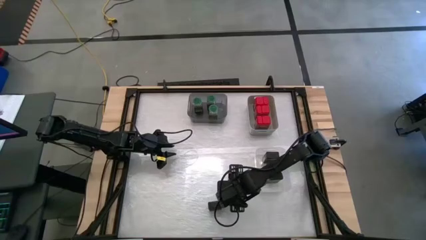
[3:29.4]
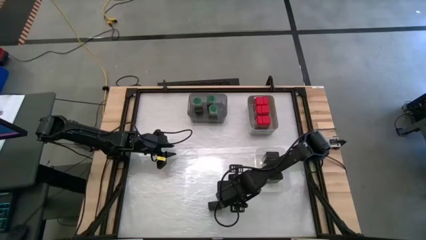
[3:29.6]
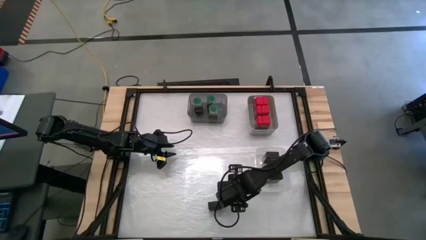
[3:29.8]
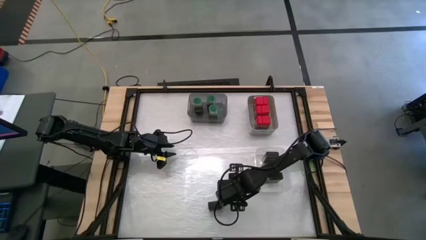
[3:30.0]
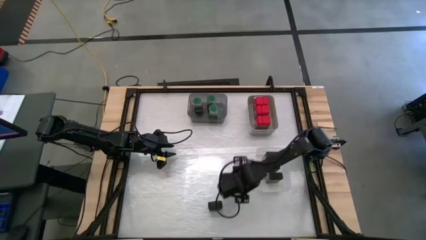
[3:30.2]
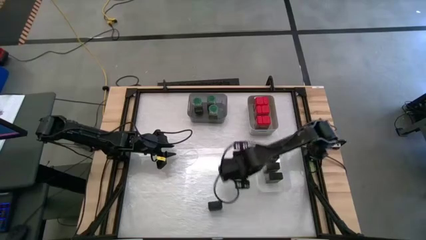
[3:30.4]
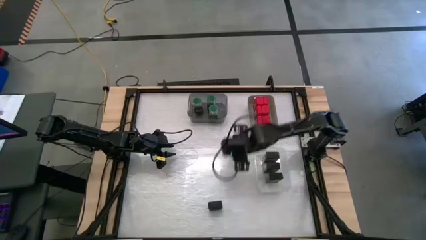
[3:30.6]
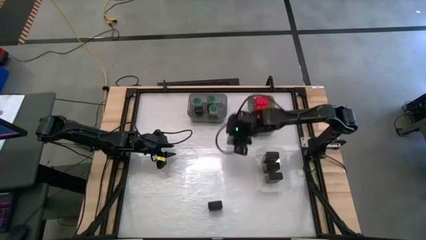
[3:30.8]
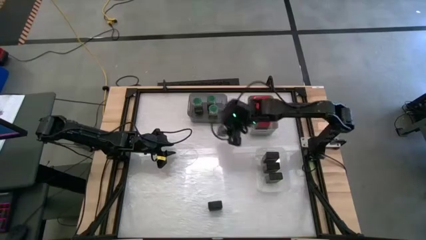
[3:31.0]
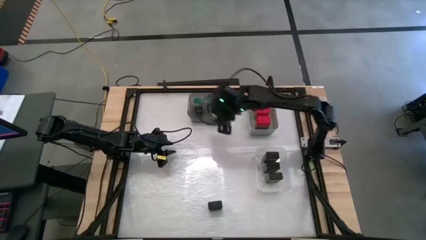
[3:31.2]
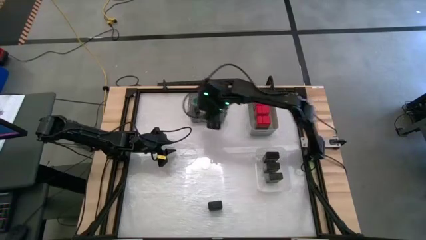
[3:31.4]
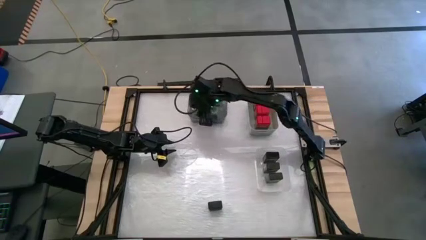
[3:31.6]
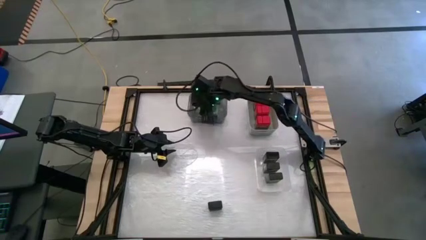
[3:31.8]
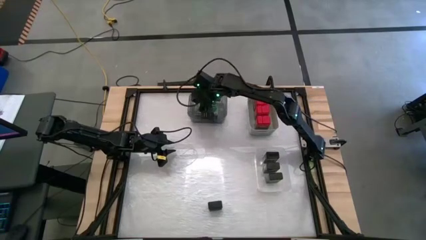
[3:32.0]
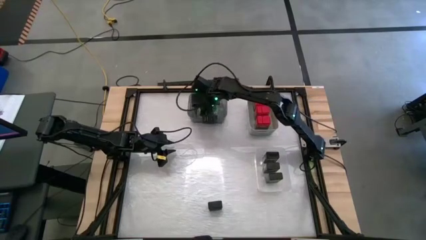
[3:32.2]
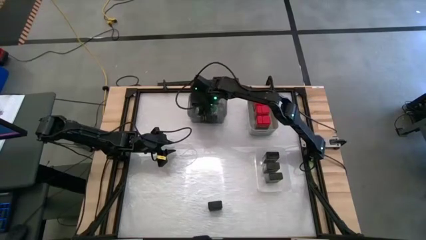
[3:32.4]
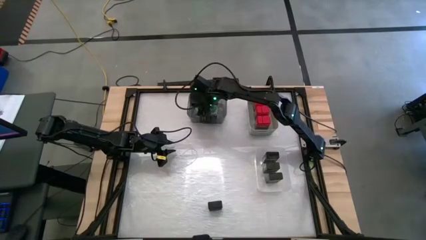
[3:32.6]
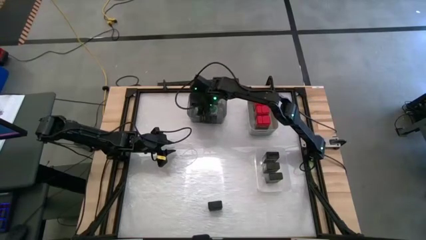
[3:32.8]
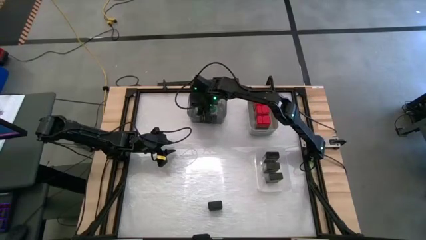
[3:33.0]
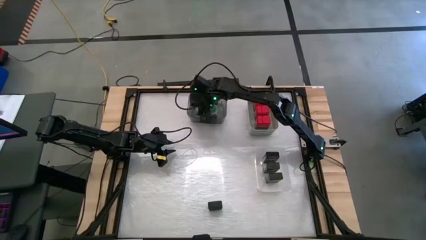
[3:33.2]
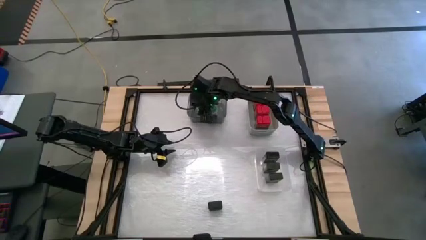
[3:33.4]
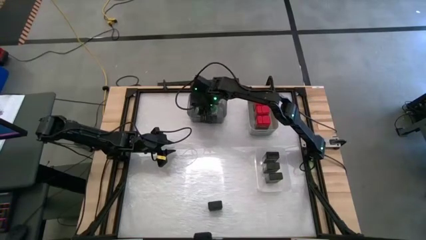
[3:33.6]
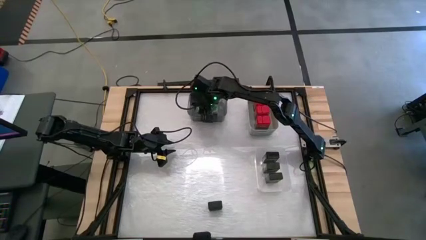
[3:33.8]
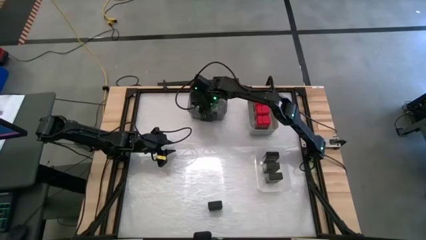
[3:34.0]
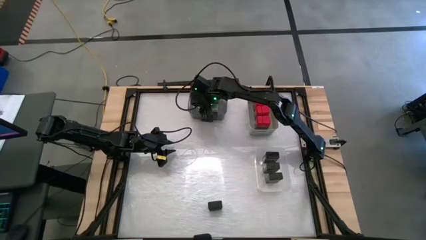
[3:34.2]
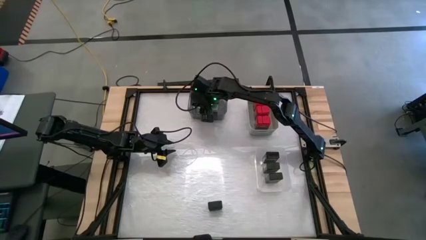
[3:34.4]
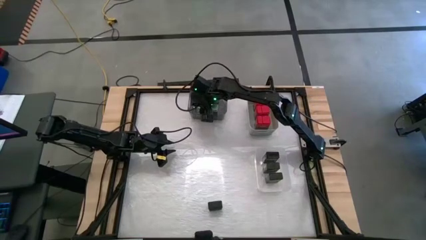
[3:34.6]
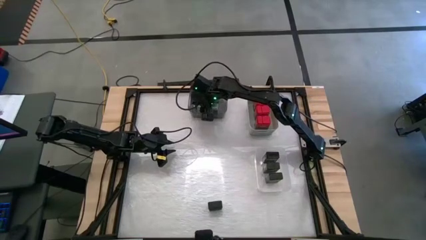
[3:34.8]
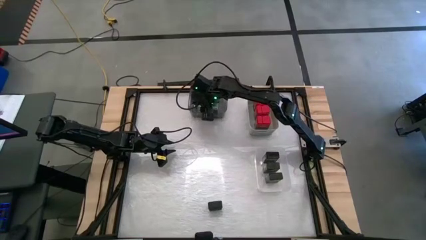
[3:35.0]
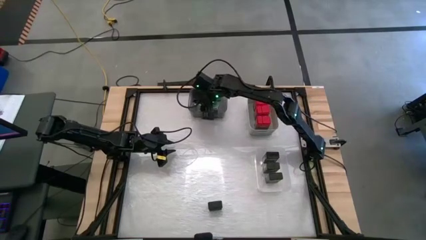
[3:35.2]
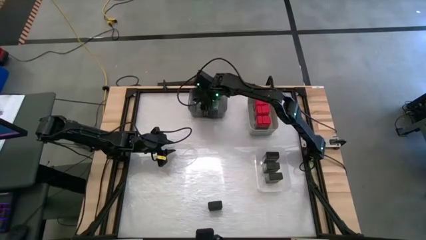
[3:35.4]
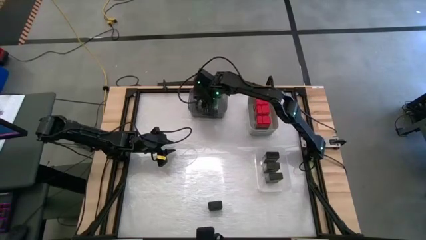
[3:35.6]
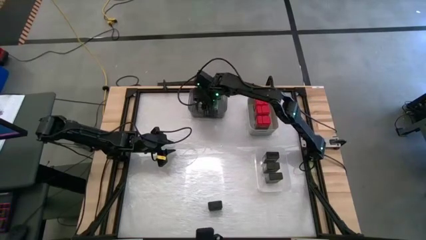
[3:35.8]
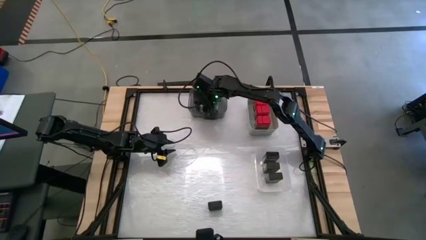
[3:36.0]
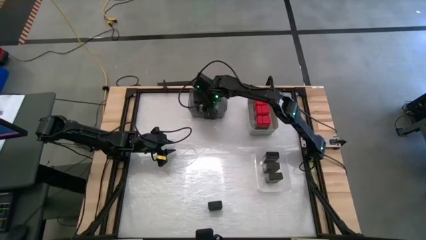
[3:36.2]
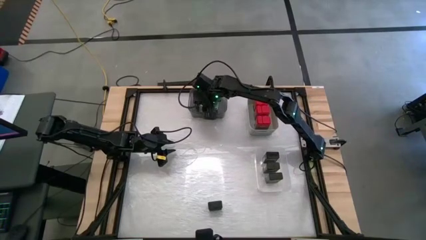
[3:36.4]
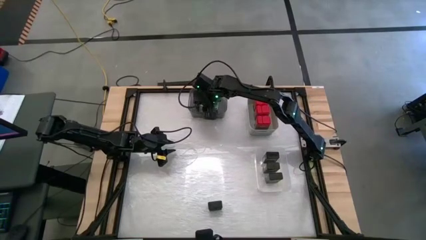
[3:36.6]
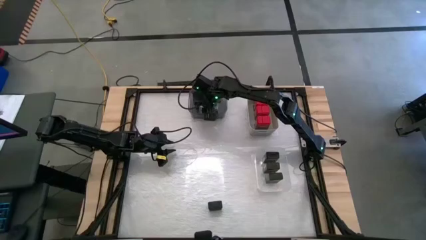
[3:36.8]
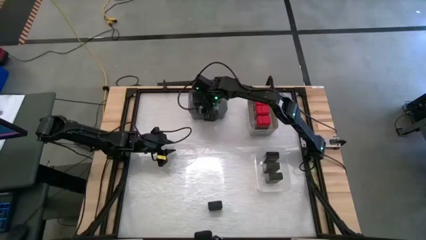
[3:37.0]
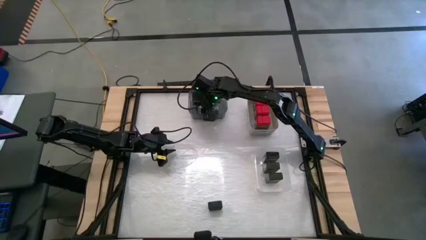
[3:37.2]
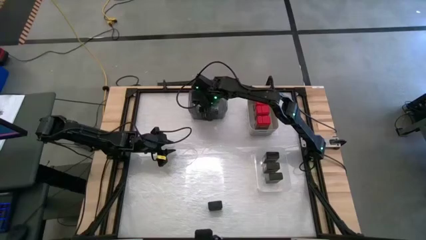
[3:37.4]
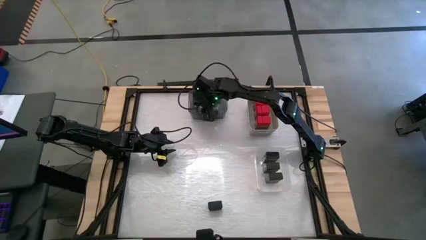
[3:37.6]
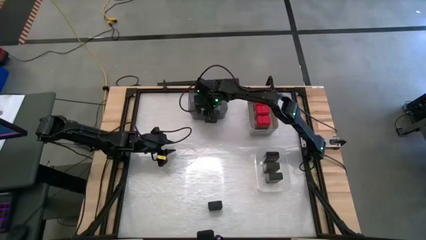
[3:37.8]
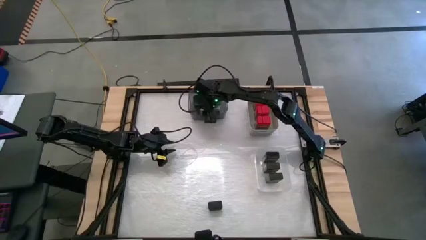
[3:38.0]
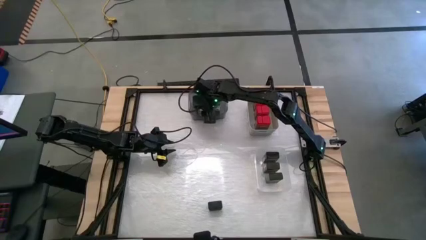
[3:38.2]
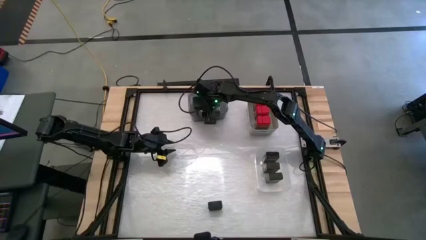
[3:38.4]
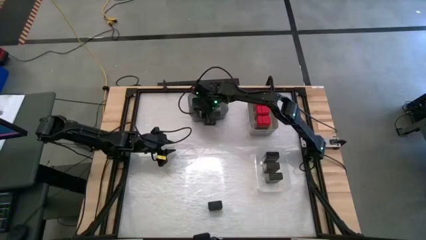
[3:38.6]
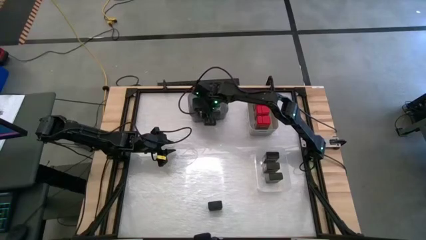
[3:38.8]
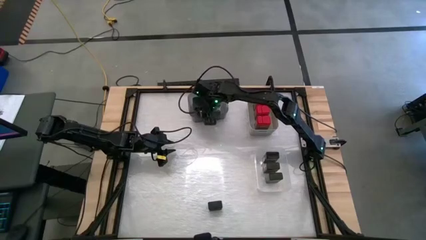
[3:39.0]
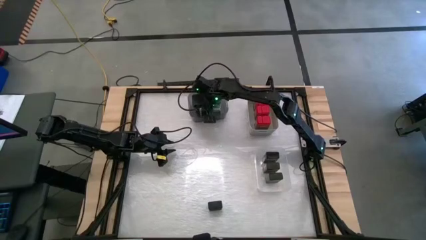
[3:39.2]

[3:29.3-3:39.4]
Task: Sort spices by type
Put the green seasoning bottle into the black bin
